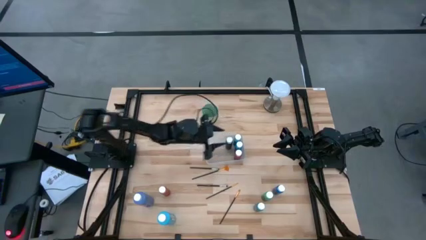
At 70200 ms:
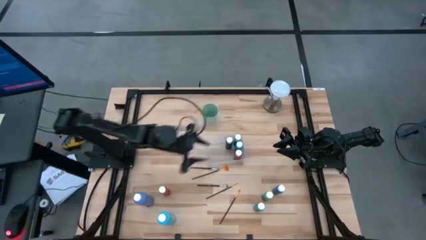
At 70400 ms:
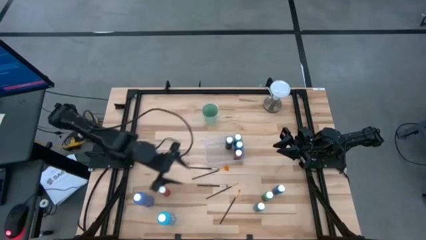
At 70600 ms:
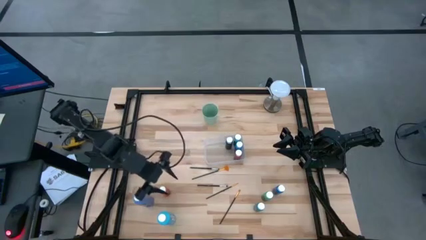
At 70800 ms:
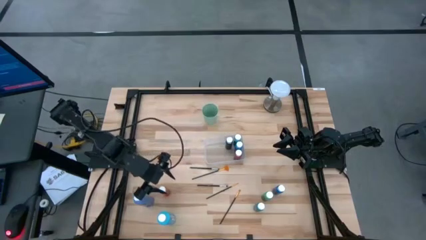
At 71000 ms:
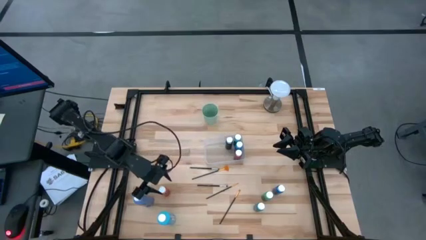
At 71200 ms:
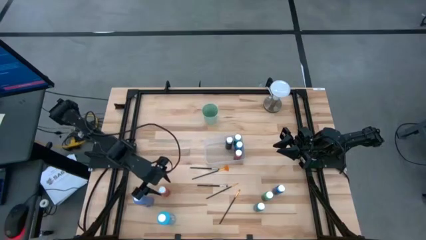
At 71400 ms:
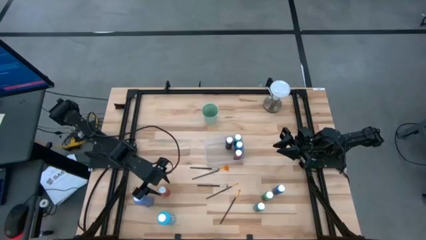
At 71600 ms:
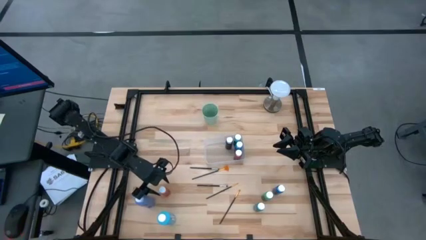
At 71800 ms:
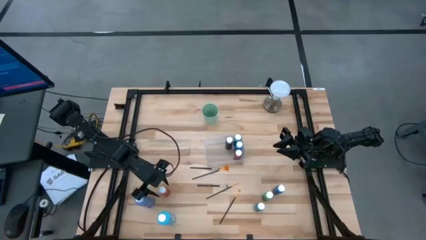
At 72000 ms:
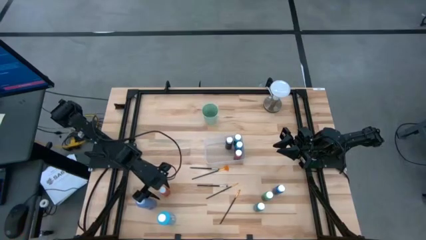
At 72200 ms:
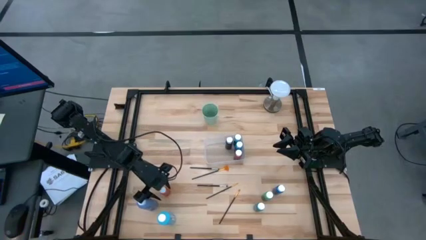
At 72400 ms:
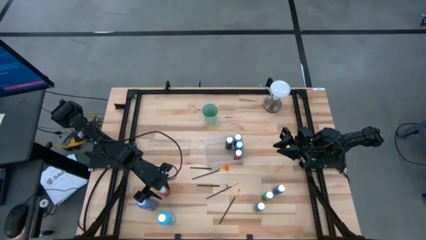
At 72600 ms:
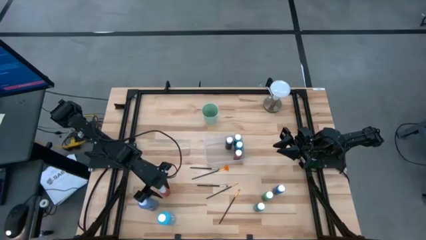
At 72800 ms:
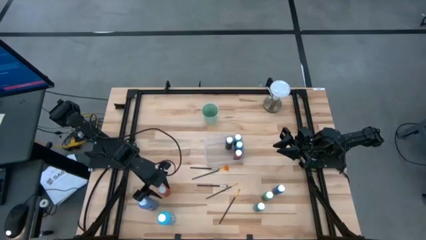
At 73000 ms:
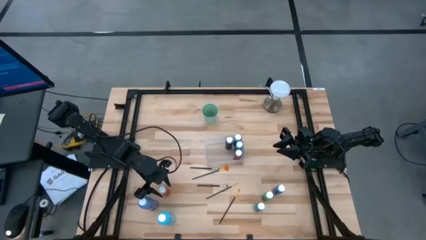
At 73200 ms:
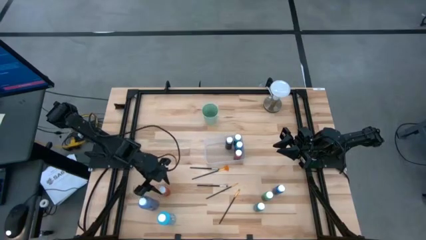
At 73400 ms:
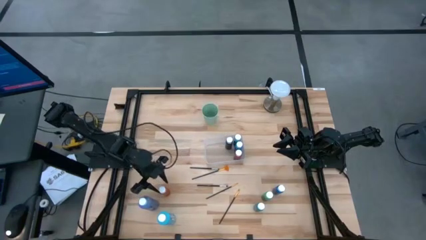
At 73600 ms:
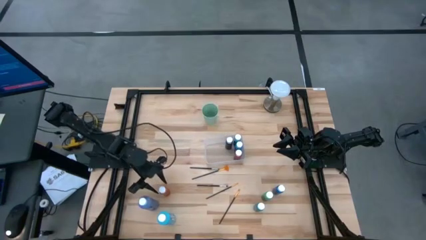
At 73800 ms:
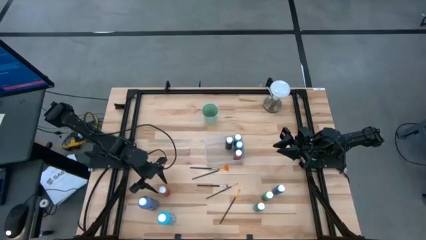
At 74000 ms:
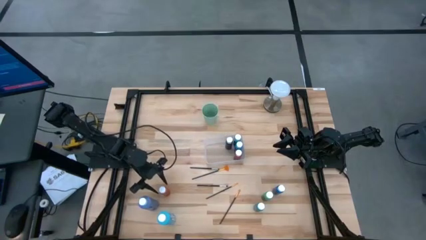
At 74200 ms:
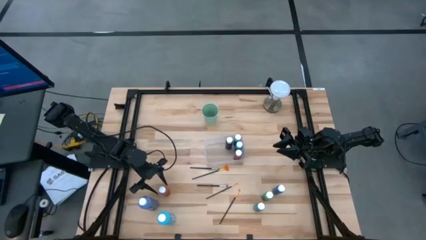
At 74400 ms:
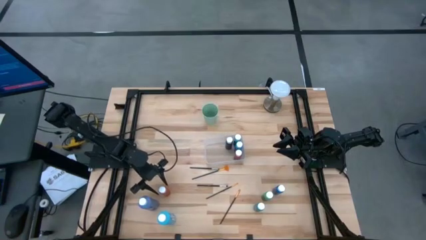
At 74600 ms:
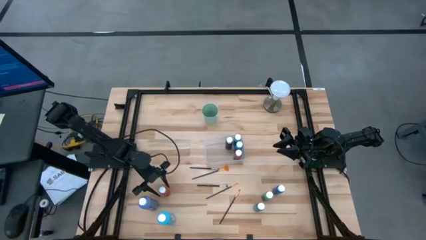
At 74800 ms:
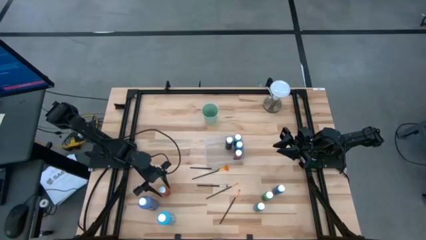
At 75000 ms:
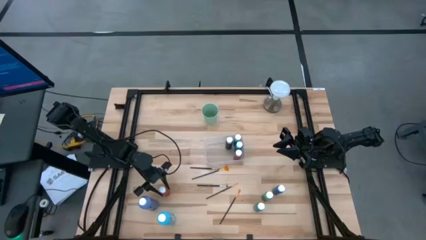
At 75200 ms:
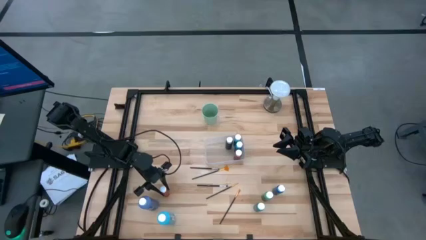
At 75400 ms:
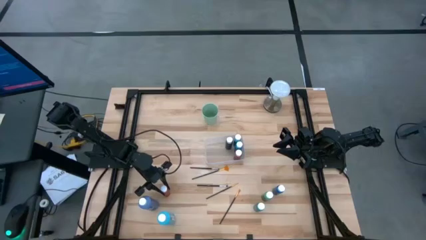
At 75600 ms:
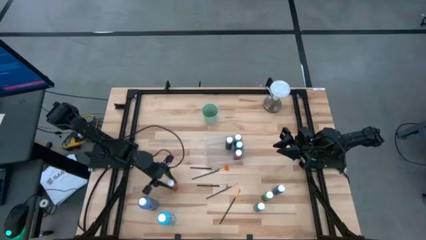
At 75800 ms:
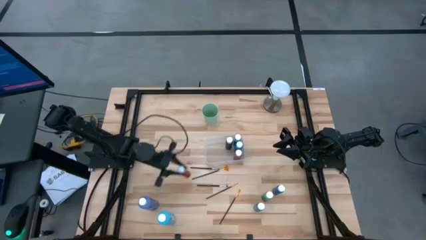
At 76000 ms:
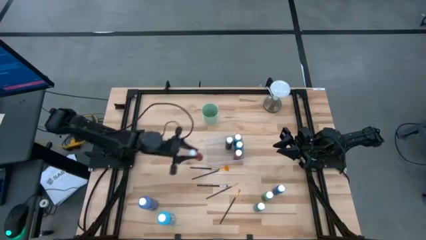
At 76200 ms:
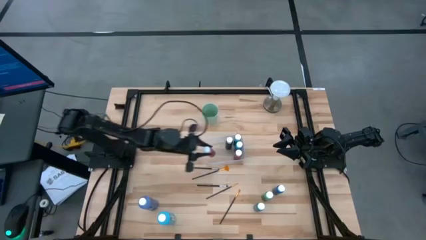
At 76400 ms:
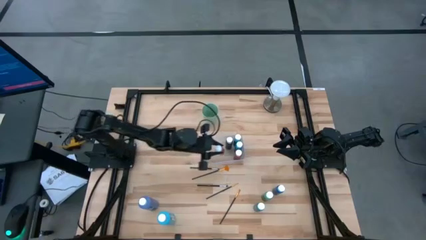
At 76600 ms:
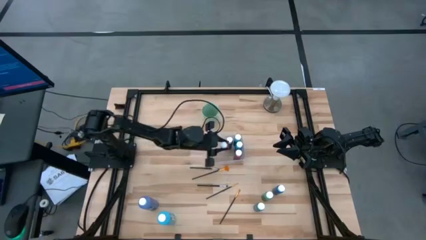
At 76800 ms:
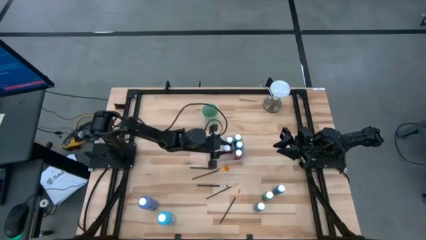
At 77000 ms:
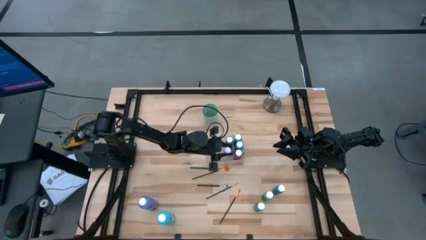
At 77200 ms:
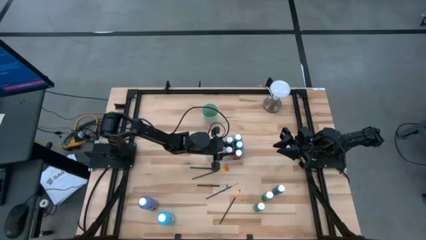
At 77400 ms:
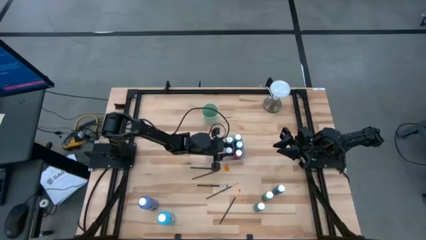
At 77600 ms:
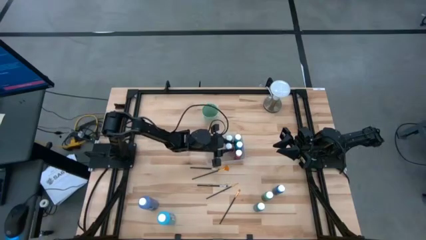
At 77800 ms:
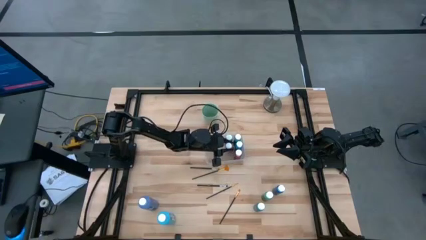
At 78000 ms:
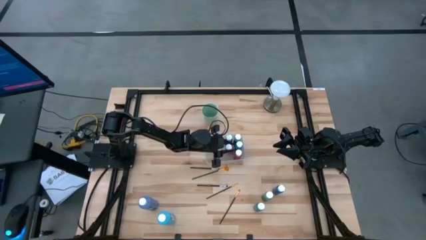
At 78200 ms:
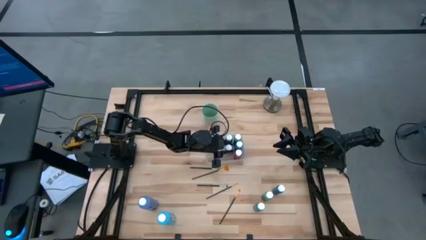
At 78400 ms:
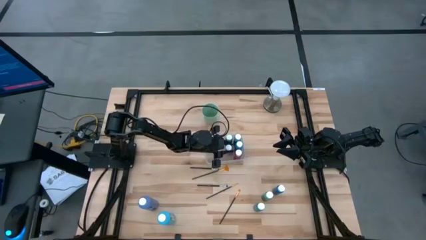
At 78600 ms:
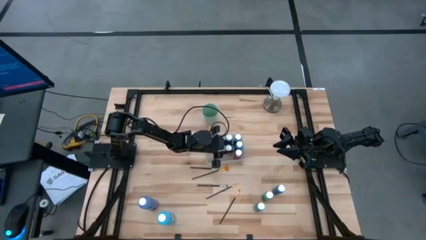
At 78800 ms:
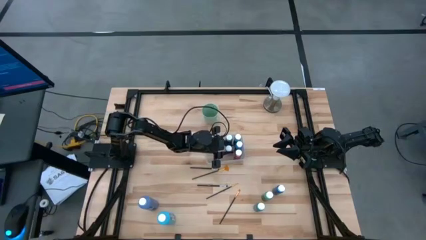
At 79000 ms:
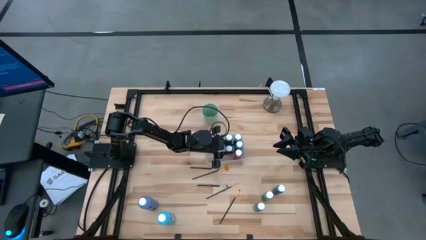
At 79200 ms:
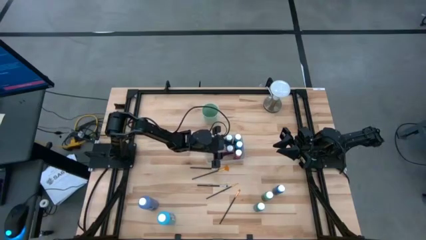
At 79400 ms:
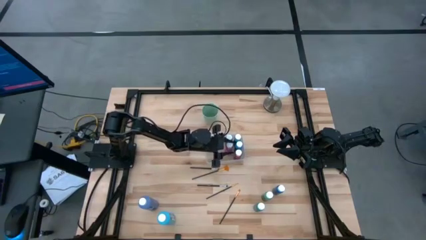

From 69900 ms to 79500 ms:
Task: Pick & Place Paint Supplies
Put the red paint bottle into the transparent bin

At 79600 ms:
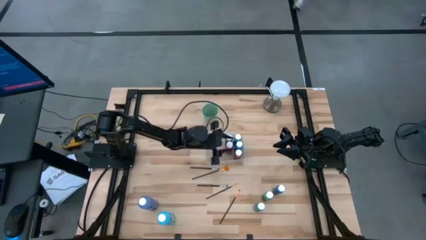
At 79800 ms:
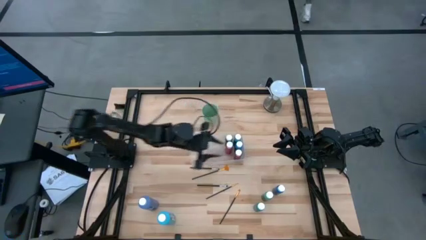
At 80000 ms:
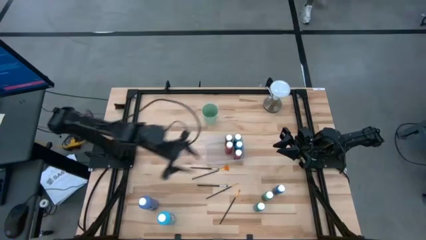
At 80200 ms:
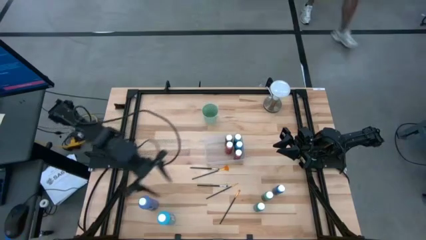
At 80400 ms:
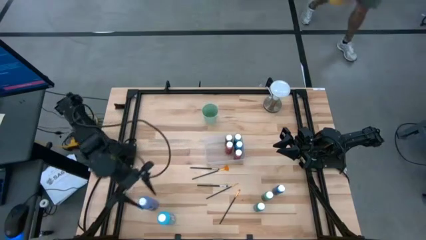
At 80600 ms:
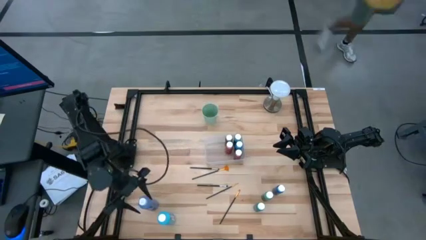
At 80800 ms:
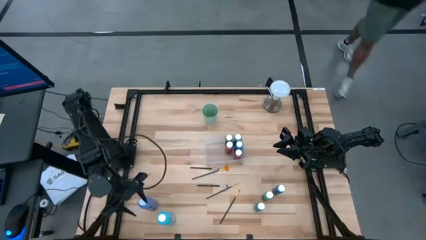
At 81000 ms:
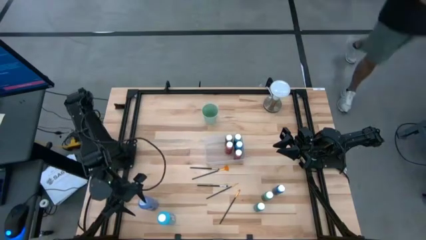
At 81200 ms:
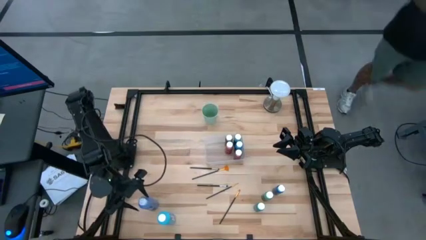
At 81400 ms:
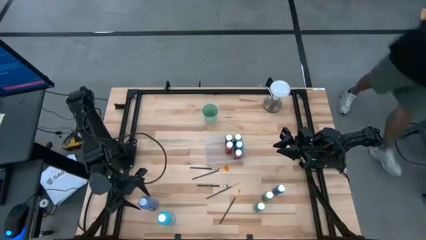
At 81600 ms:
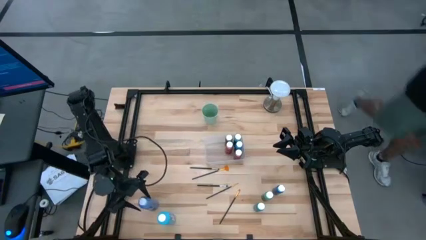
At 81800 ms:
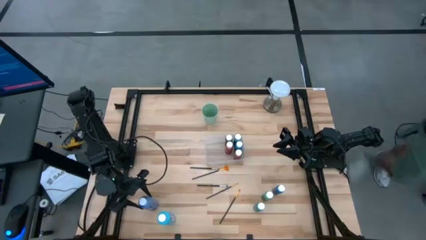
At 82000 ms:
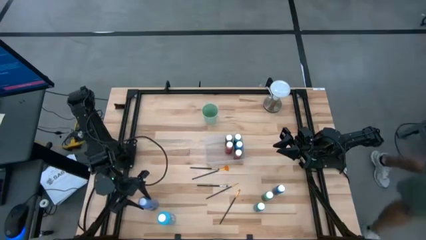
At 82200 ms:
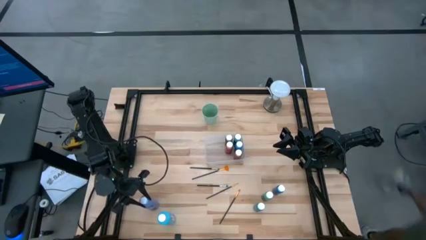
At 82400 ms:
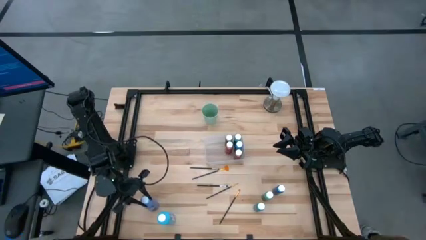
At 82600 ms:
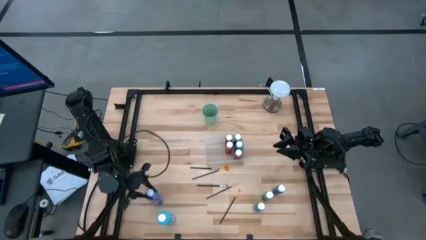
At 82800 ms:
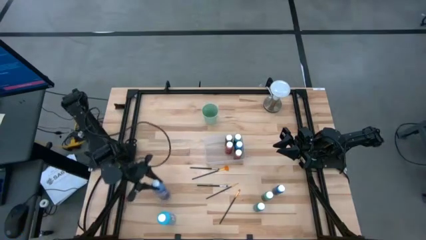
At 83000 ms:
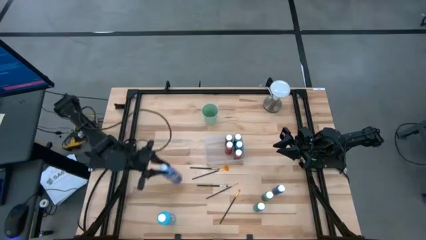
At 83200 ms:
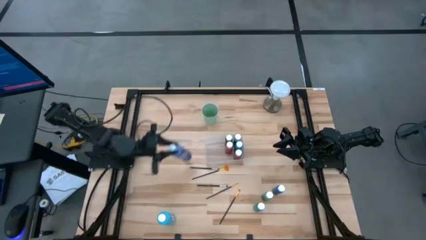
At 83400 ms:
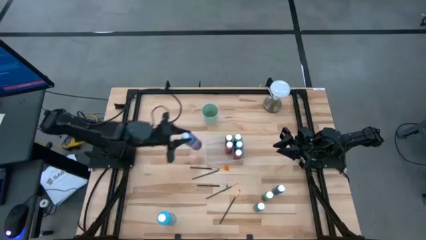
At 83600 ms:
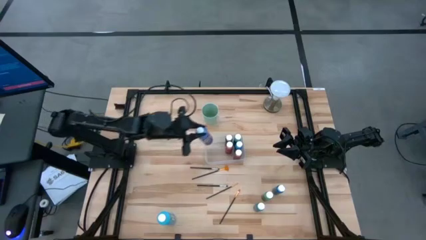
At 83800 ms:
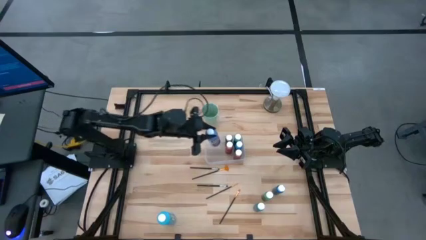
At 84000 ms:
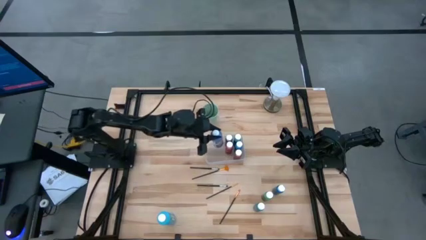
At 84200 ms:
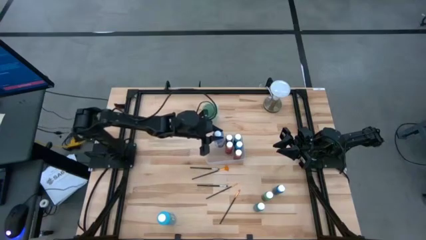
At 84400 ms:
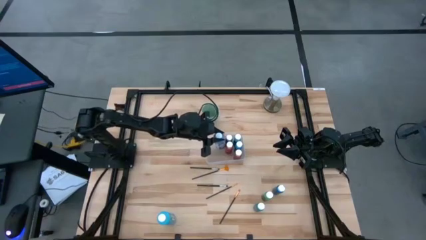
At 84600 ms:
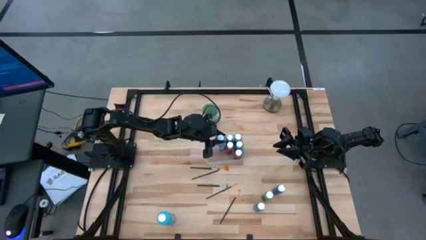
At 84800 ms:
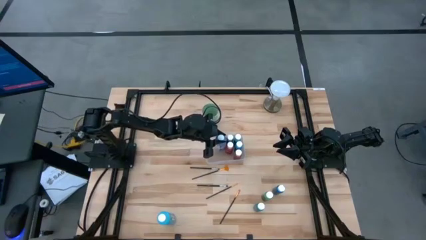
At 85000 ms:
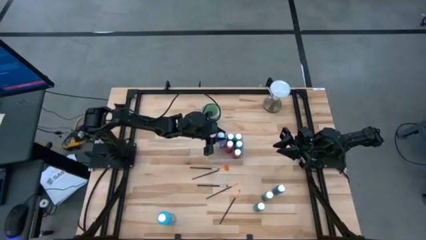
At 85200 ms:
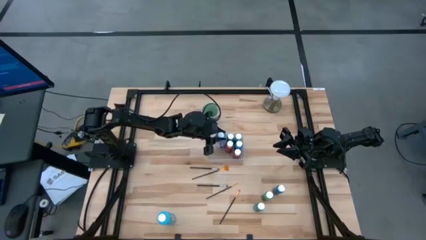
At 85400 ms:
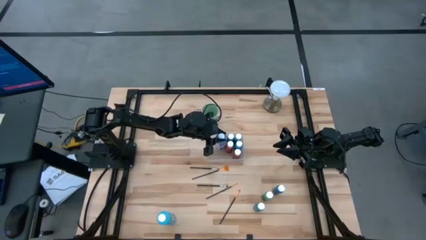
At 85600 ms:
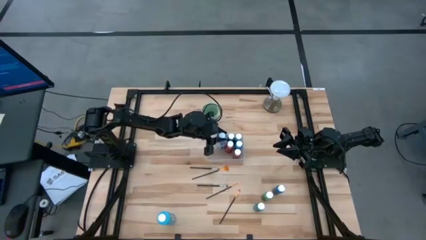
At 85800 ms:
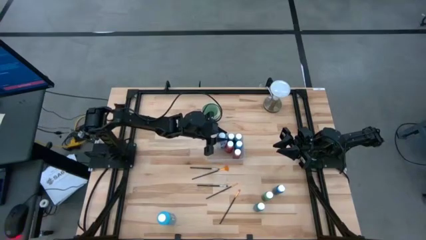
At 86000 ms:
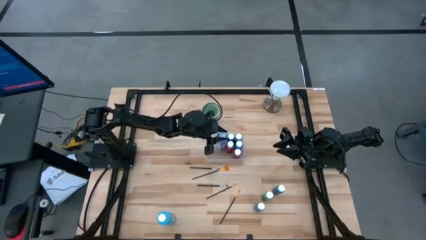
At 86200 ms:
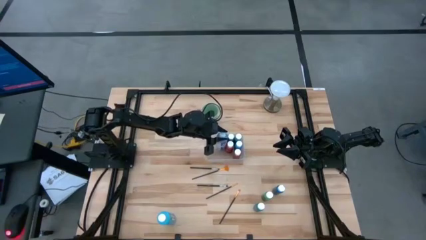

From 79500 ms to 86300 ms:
Put the purple paint bottle into the transparent bin

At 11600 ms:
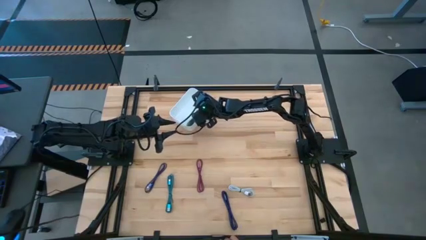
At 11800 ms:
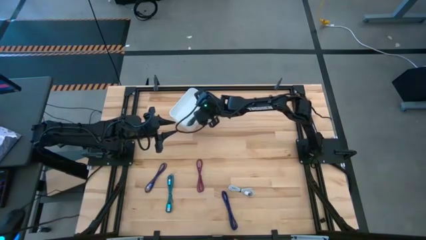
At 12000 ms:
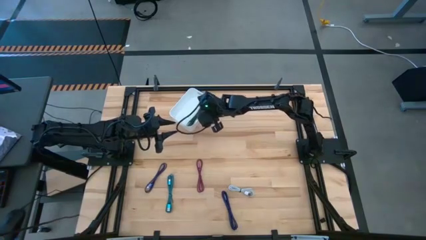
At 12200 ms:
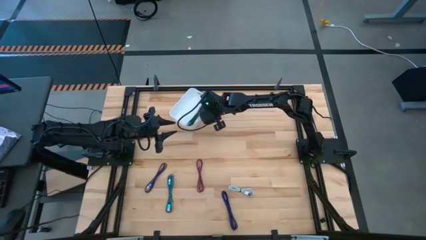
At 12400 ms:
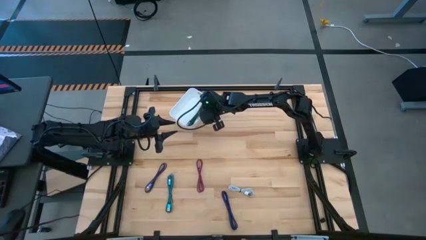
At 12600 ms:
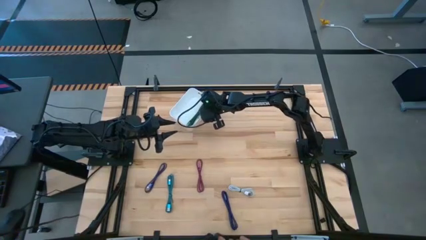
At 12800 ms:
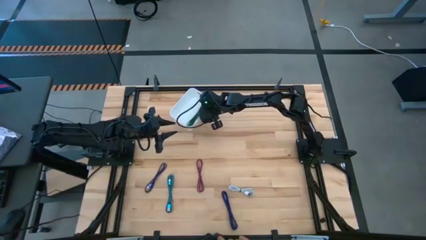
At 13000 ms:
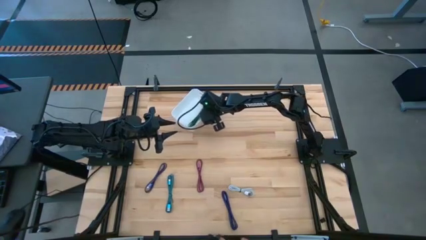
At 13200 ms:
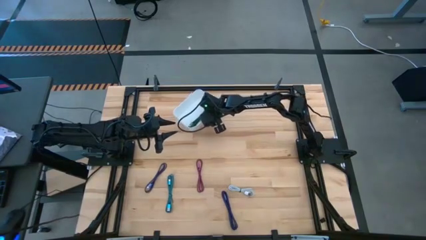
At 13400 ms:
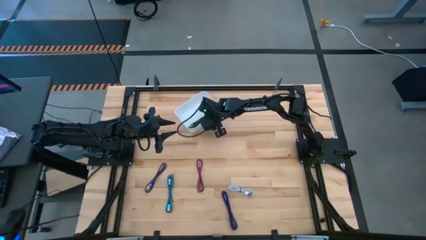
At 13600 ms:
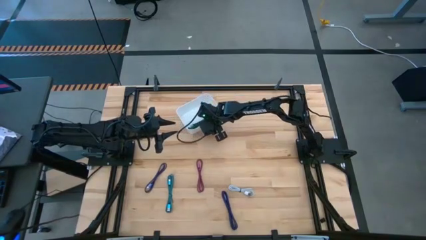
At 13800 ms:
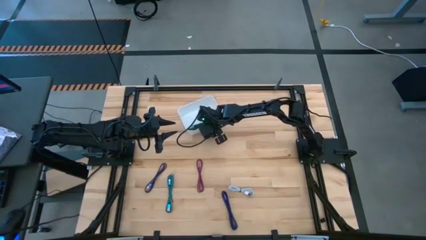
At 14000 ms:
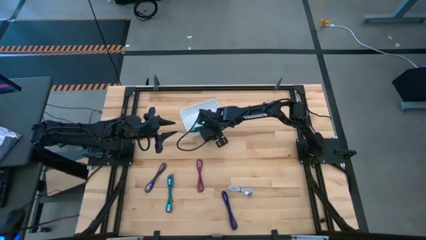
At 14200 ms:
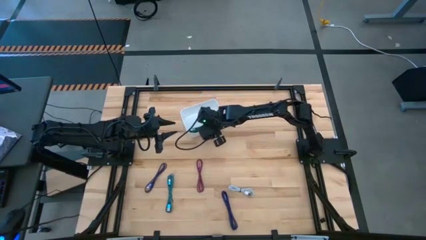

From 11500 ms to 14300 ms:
Task: Pick and place USB-C Cables
Adjust the white bin
